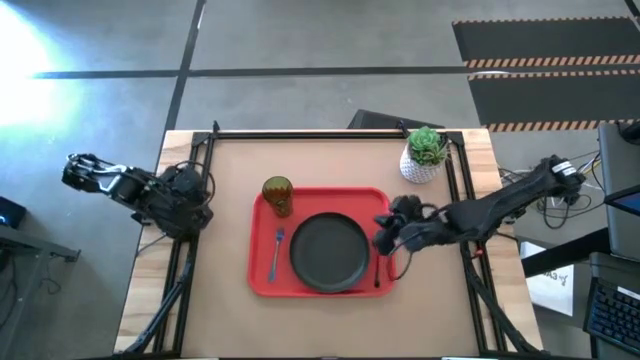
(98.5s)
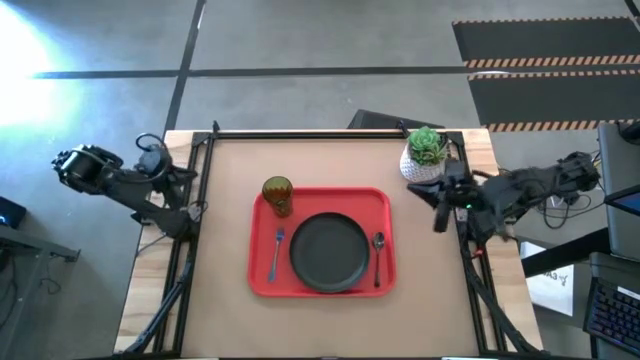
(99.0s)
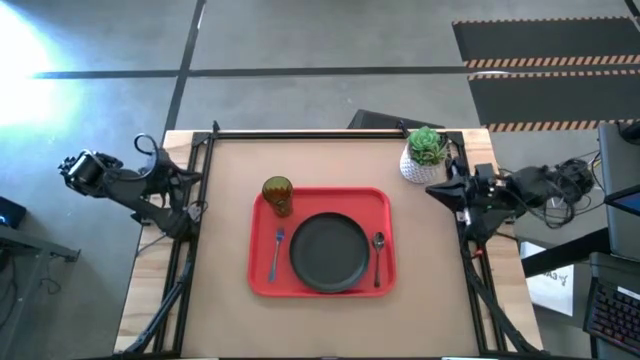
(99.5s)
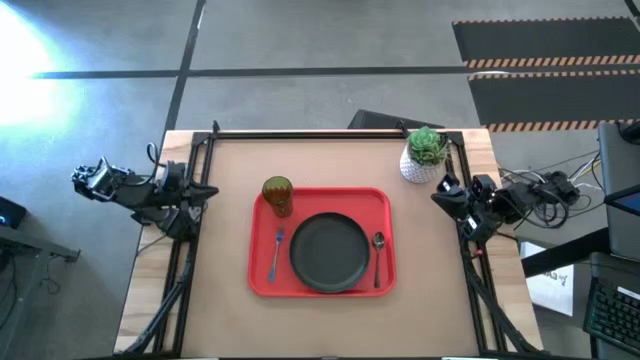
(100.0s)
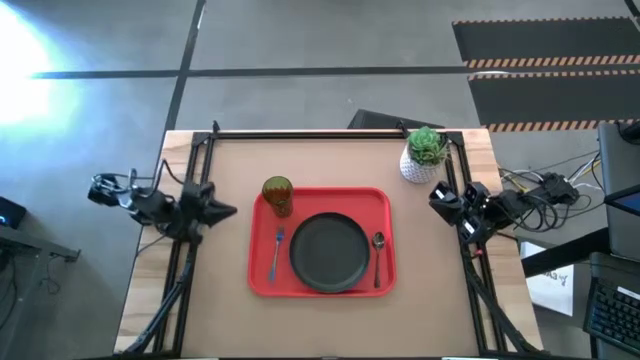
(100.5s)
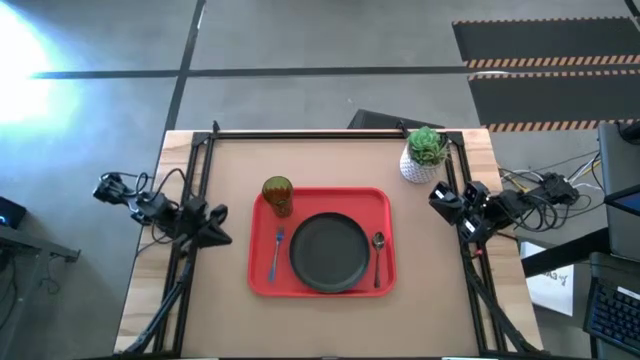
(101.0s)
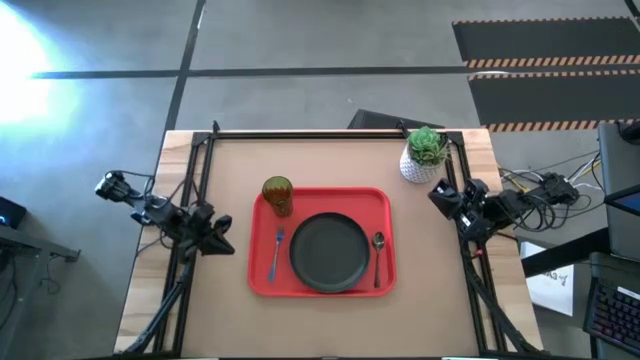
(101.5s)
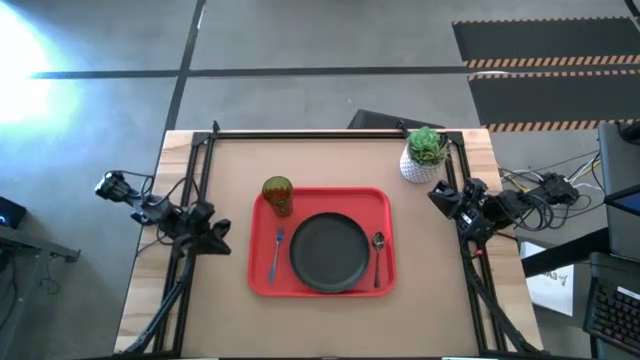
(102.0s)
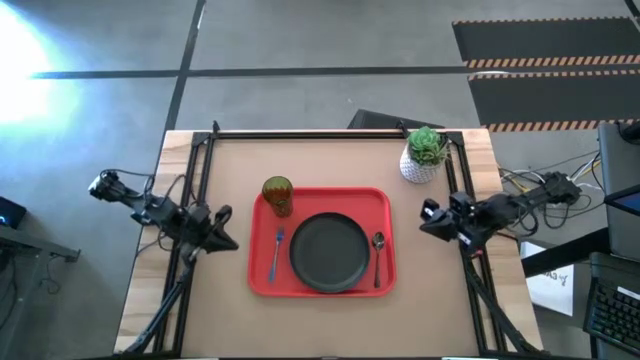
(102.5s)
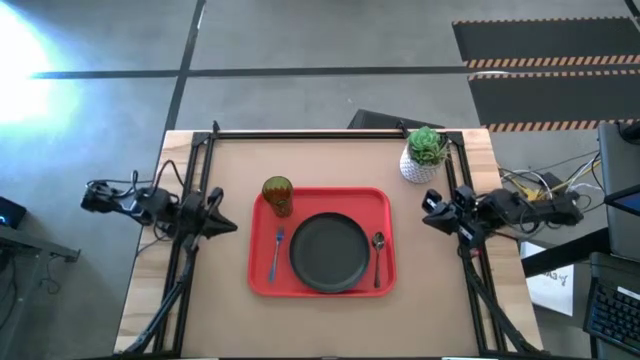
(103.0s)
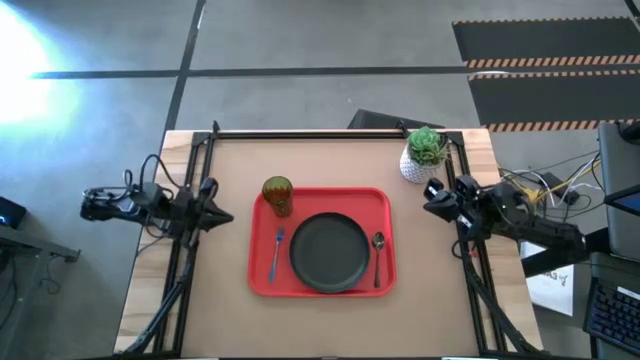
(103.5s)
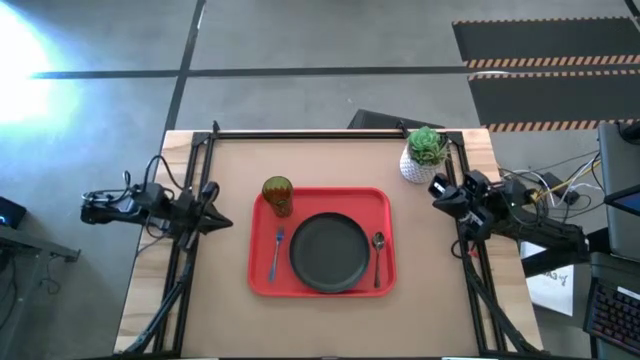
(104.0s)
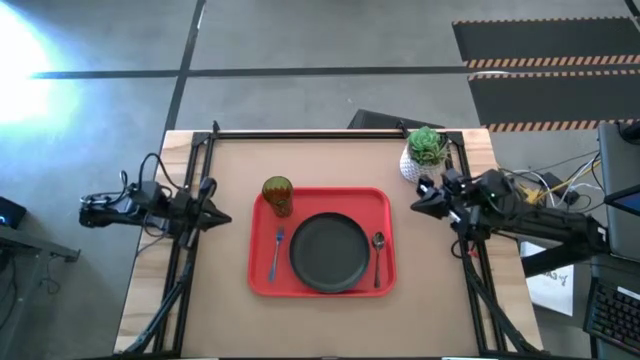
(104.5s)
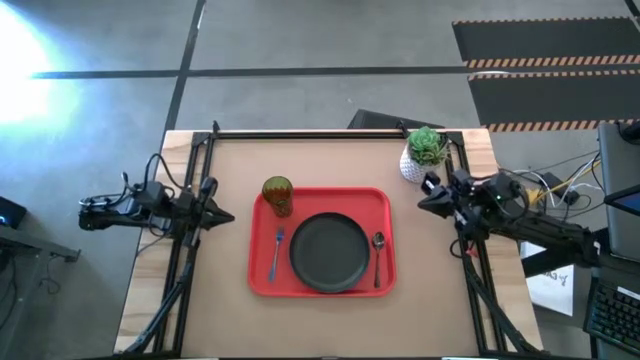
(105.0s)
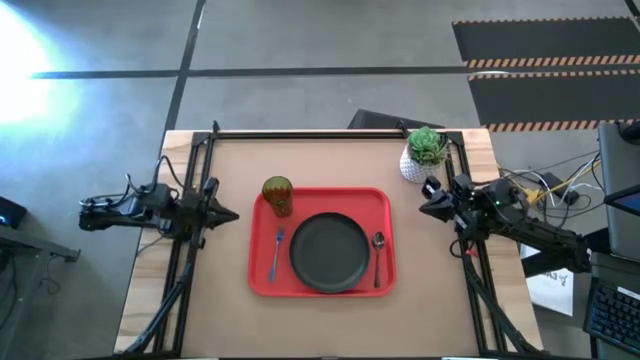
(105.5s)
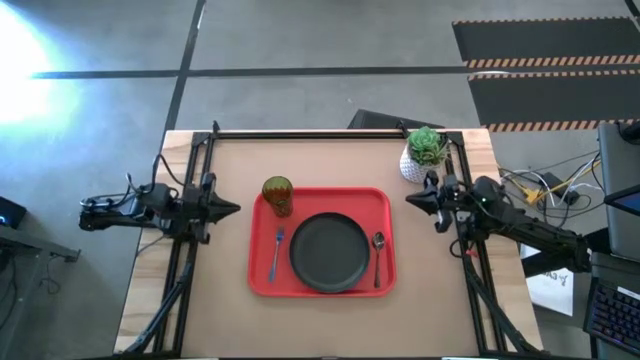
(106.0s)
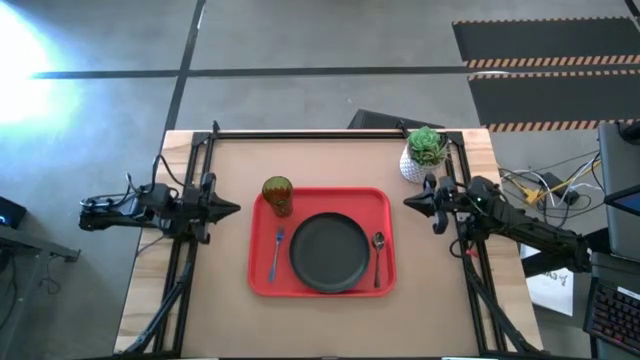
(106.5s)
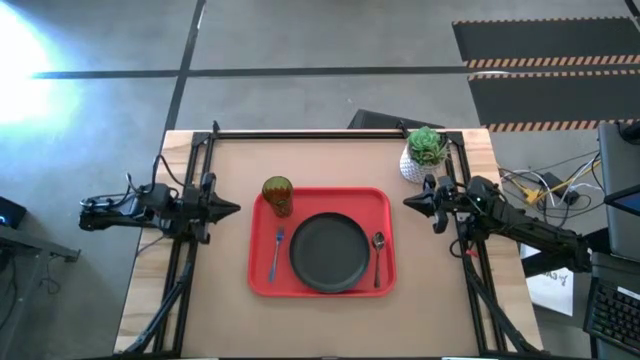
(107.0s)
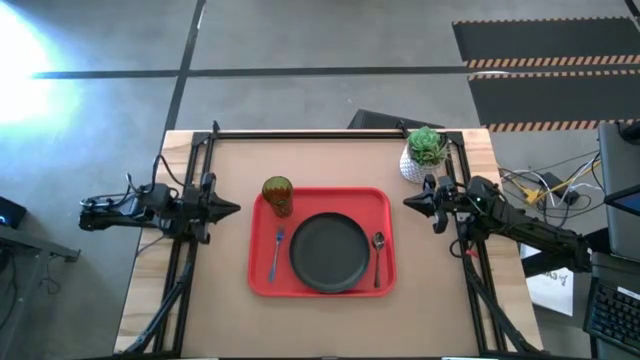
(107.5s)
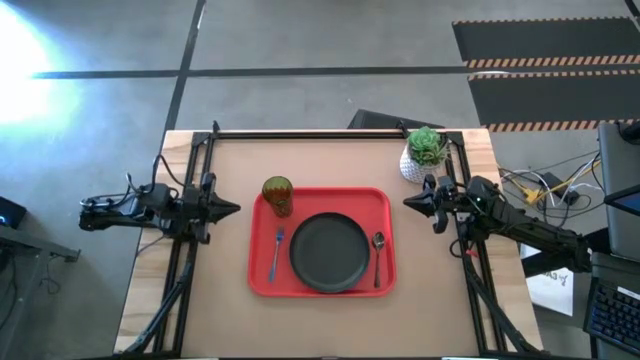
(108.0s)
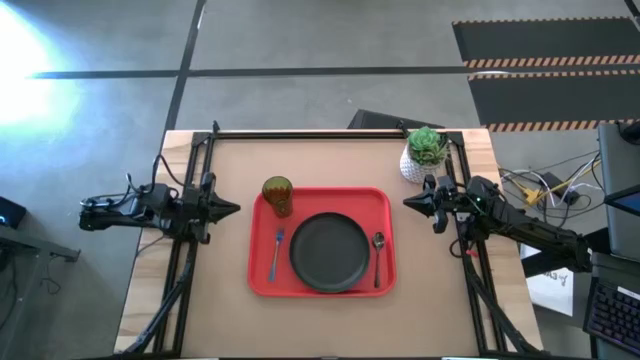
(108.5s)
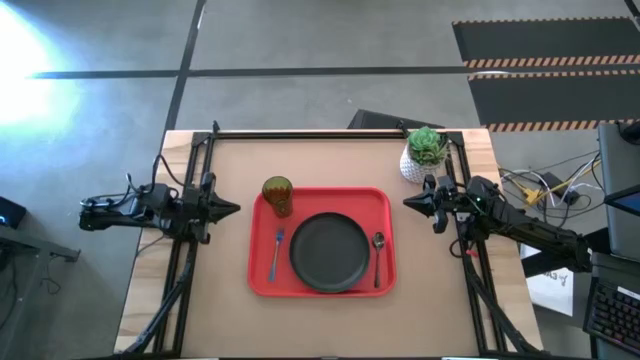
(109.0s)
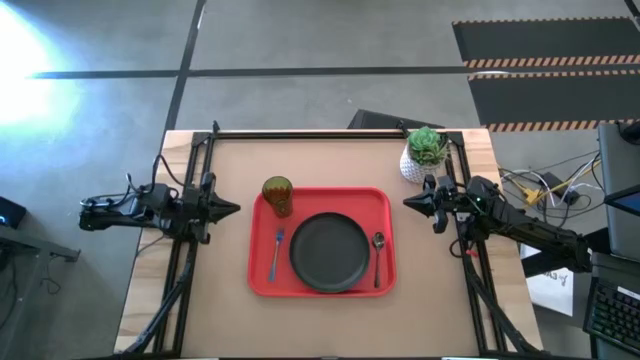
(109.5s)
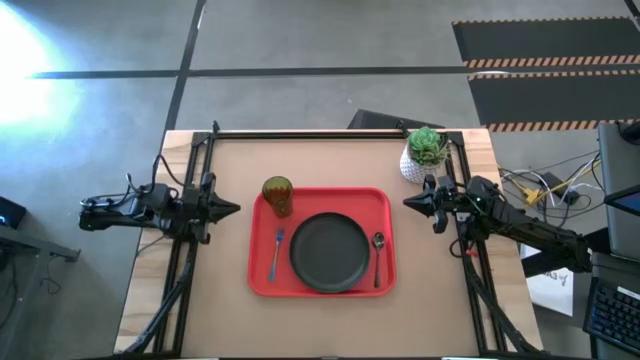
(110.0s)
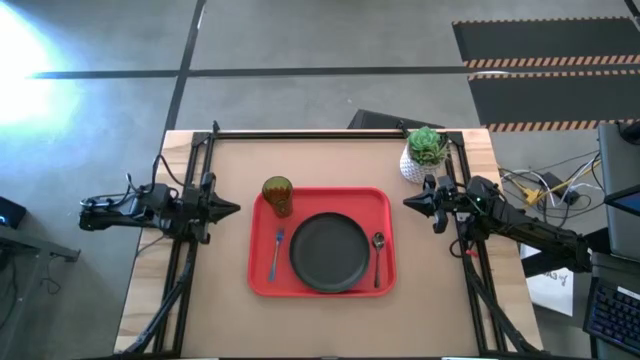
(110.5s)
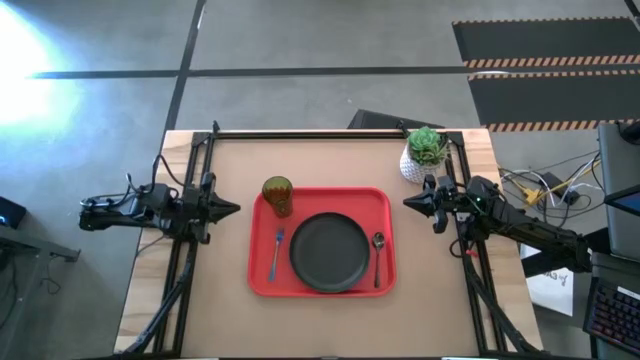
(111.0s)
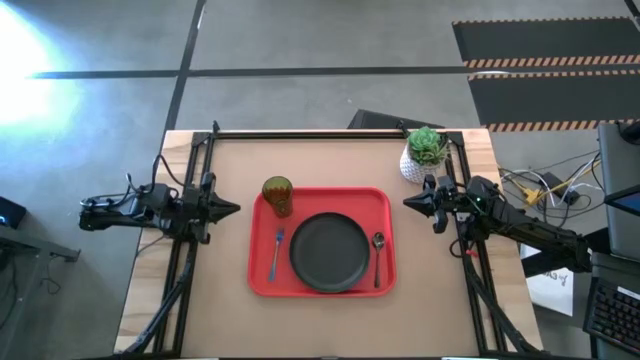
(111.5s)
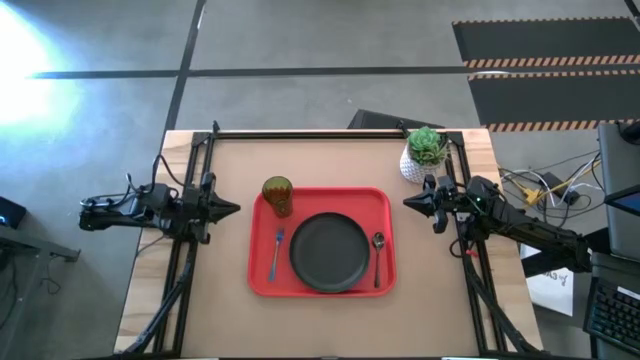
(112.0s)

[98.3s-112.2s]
Task: Pick and place plate/cup/fork/spoon on tray
Return to Home Position

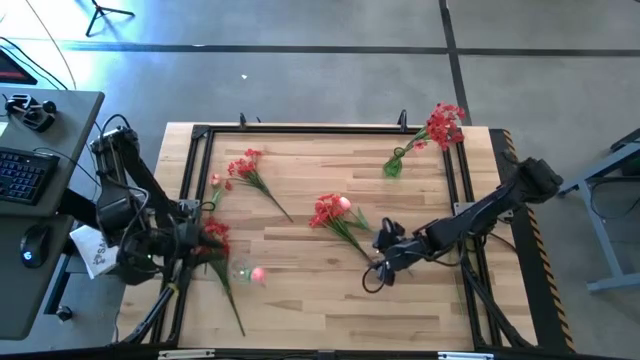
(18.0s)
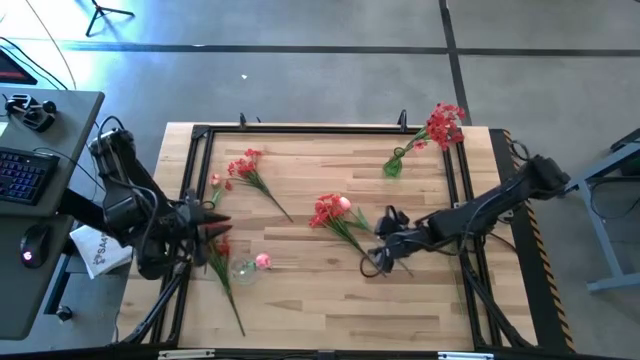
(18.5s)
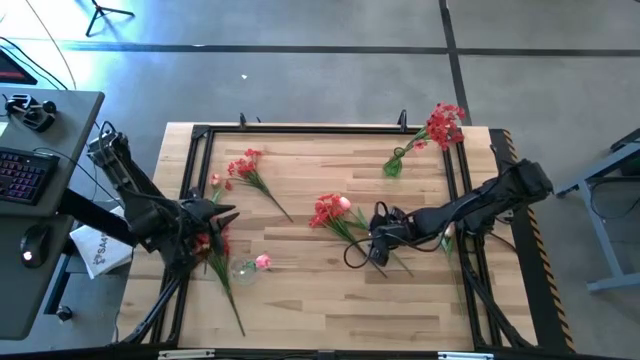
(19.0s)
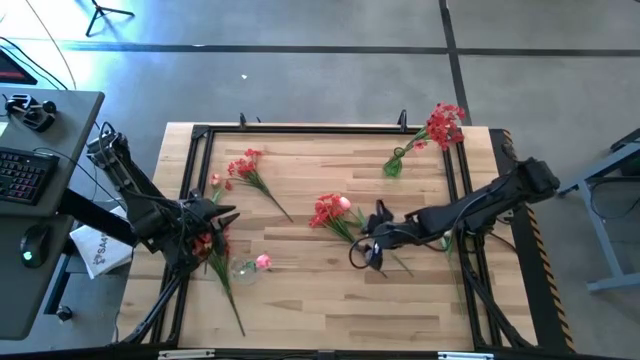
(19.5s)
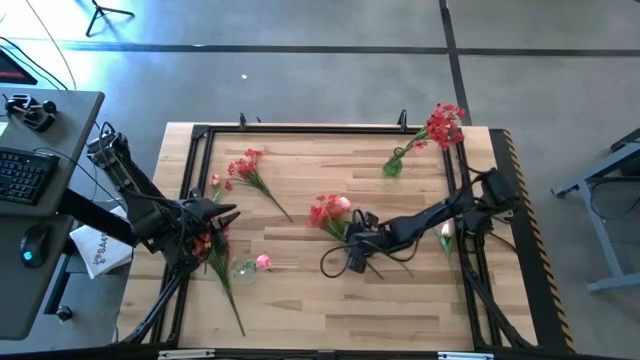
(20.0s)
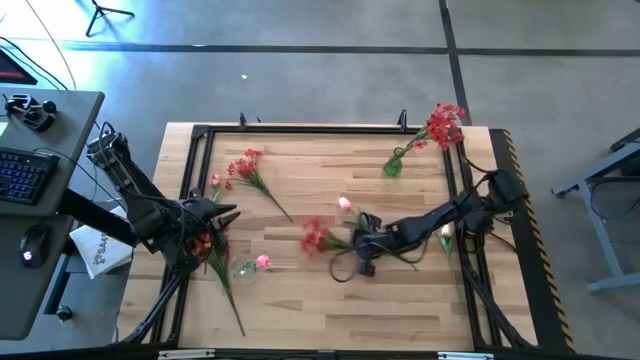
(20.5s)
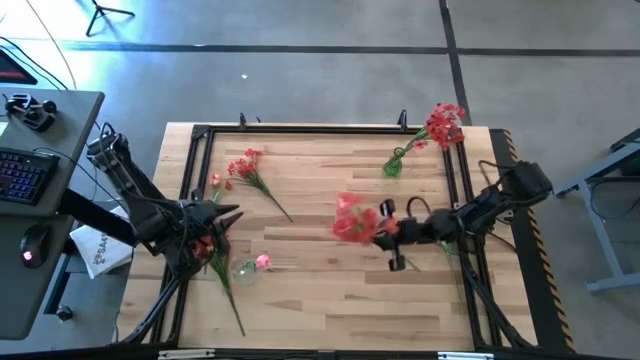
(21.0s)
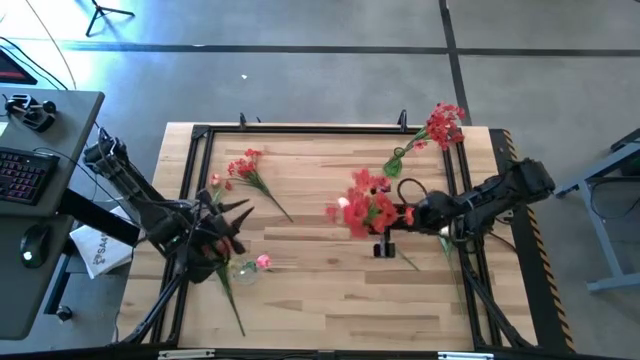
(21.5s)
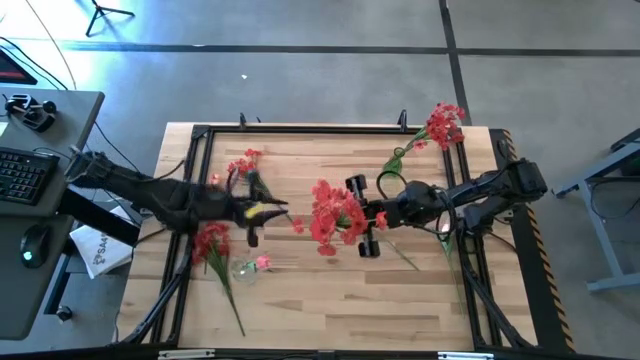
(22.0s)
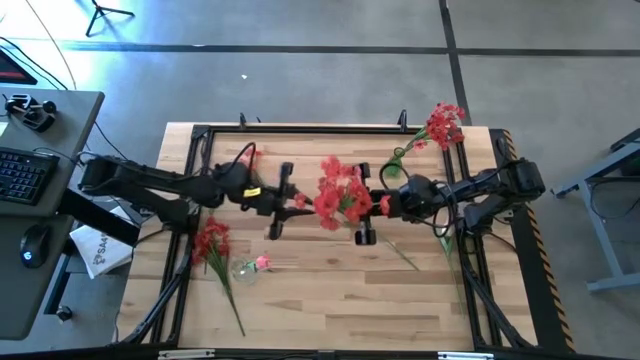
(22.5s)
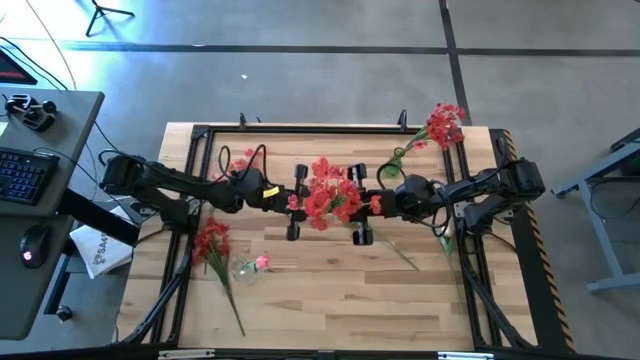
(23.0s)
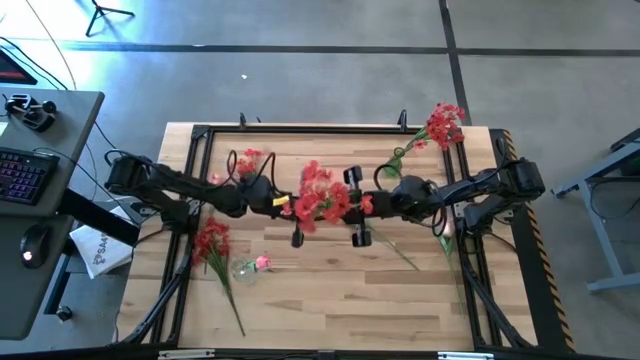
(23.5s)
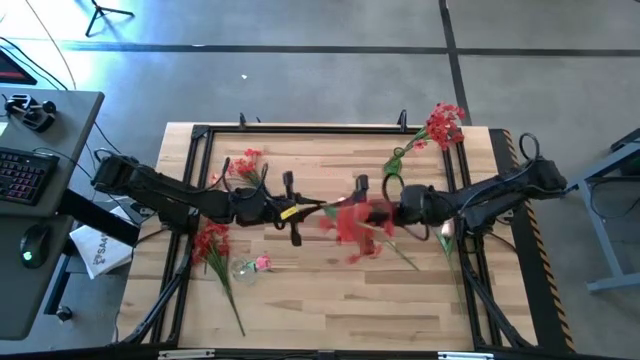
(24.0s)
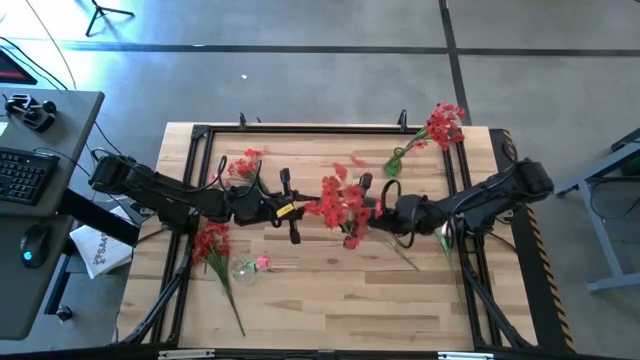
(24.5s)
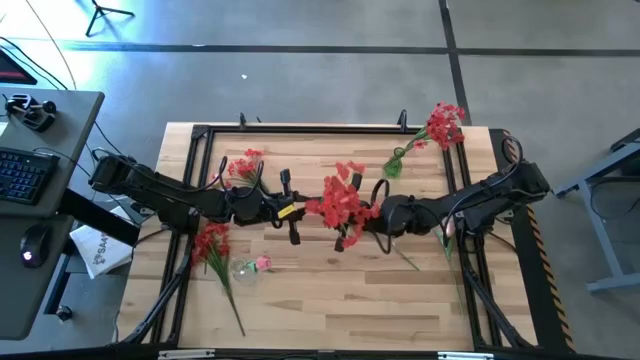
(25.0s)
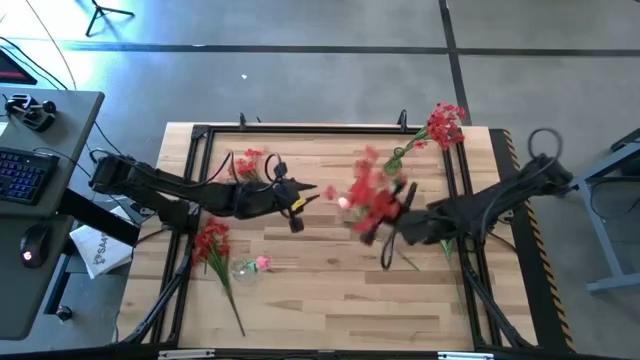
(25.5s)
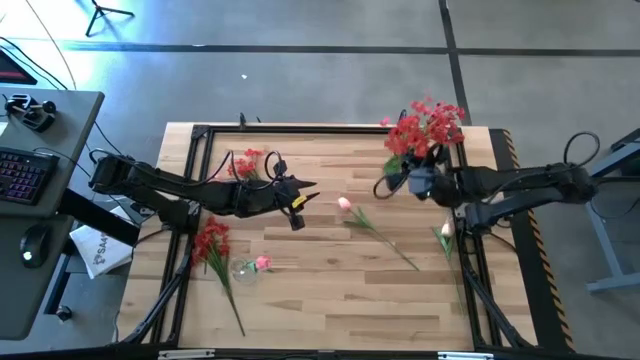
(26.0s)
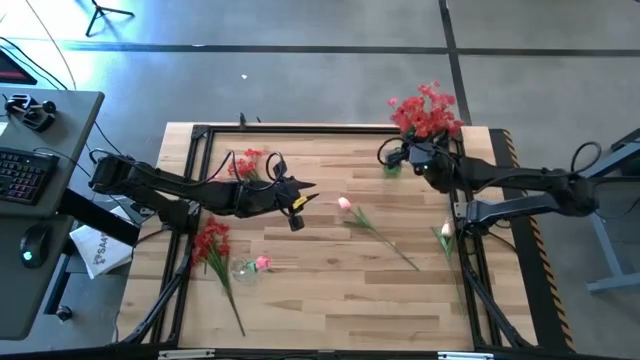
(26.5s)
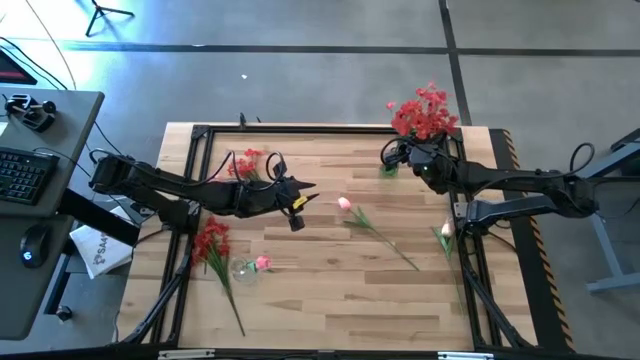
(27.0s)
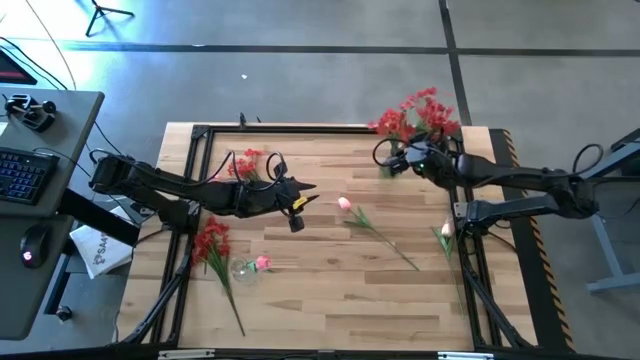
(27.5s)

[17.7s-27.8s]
Task: Sort flowers into vase by color
Put the red flowers into the green vase
